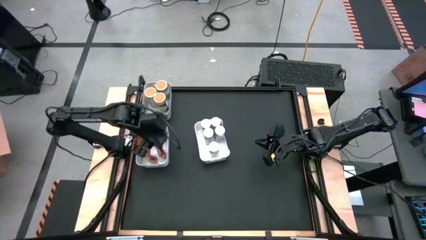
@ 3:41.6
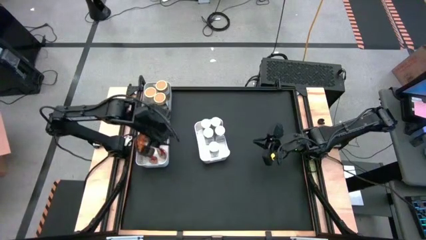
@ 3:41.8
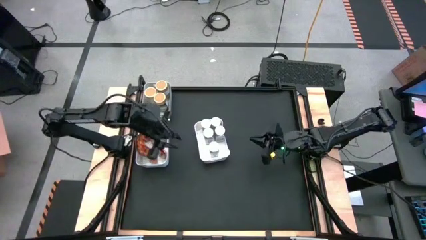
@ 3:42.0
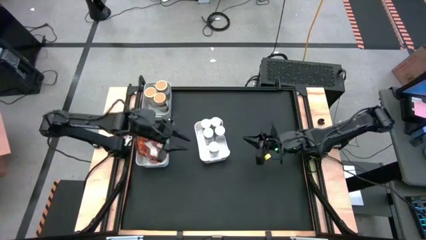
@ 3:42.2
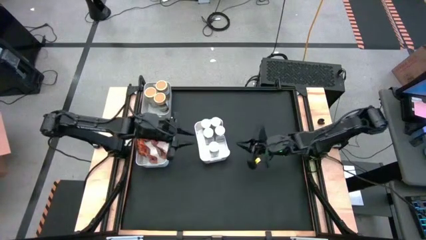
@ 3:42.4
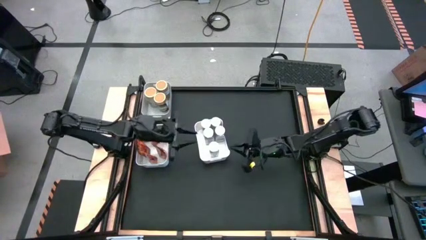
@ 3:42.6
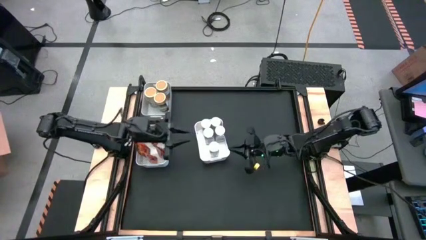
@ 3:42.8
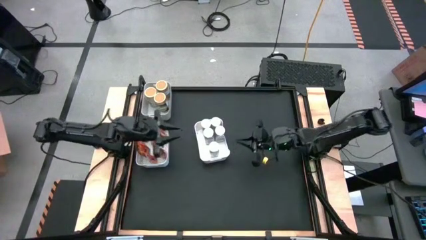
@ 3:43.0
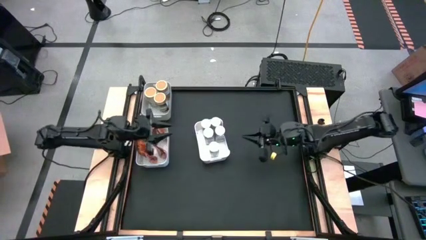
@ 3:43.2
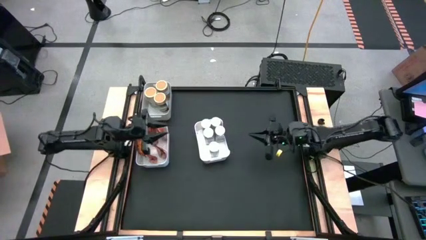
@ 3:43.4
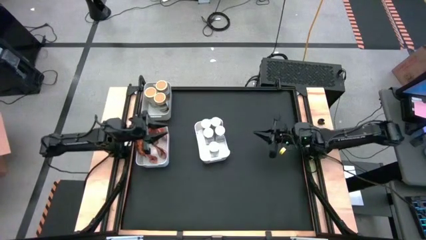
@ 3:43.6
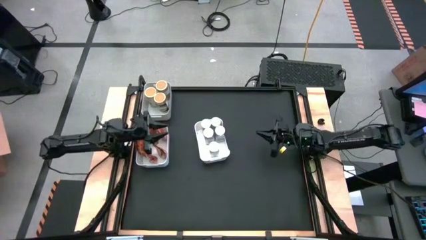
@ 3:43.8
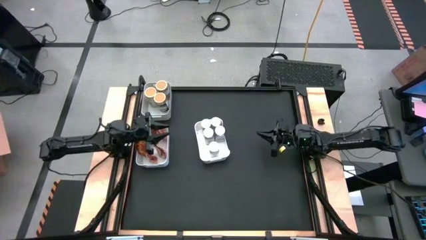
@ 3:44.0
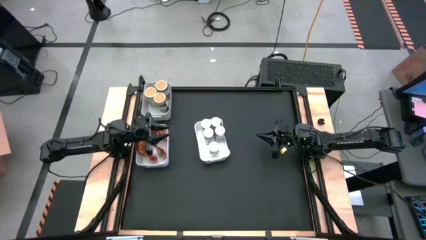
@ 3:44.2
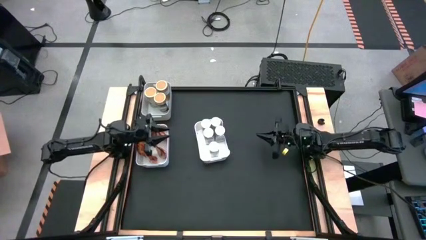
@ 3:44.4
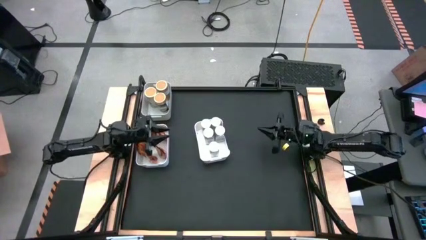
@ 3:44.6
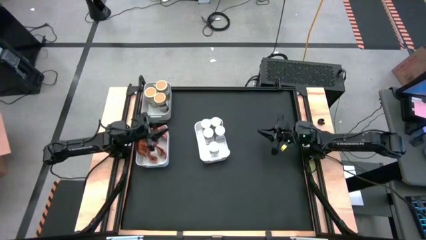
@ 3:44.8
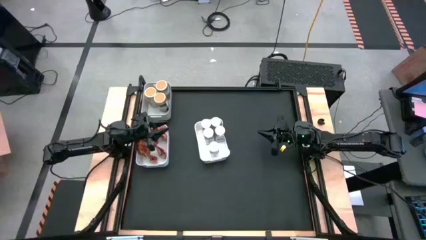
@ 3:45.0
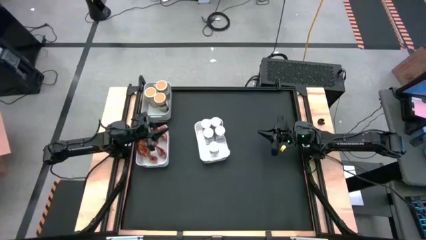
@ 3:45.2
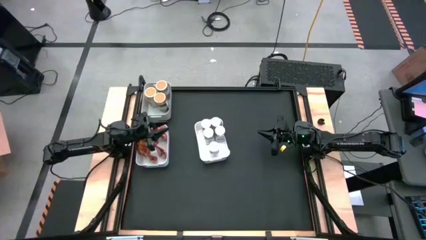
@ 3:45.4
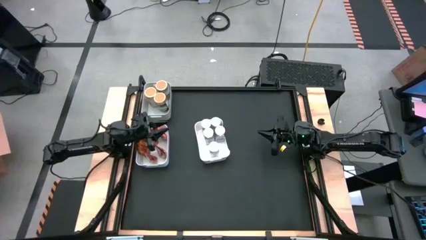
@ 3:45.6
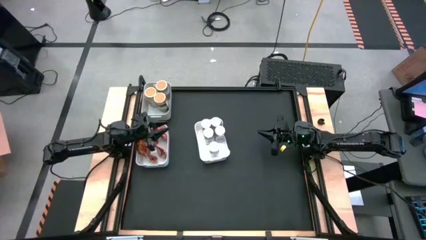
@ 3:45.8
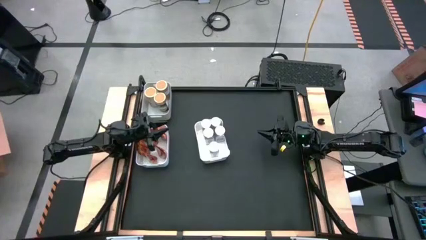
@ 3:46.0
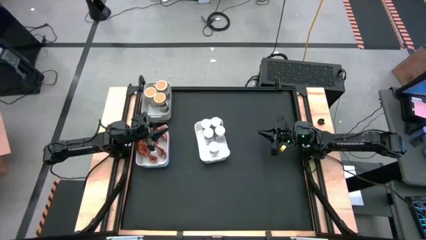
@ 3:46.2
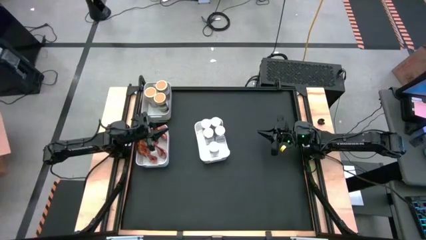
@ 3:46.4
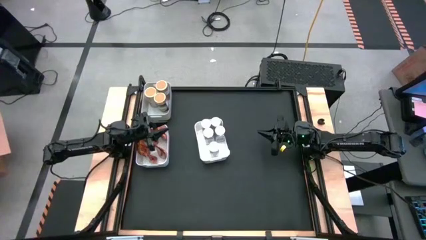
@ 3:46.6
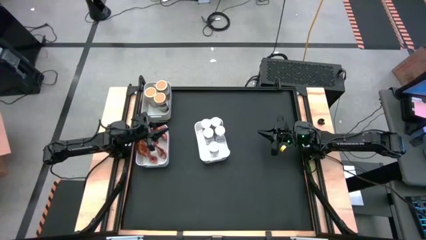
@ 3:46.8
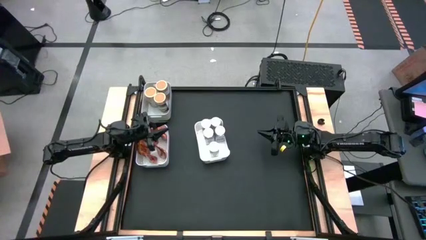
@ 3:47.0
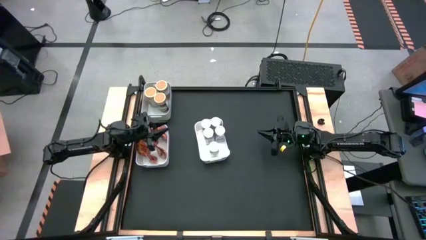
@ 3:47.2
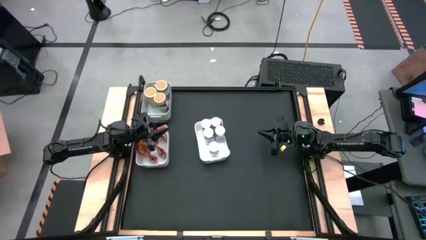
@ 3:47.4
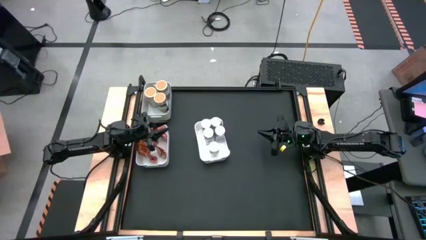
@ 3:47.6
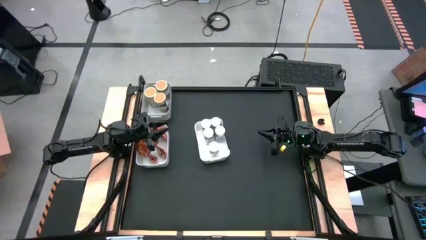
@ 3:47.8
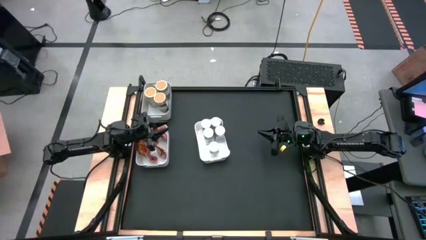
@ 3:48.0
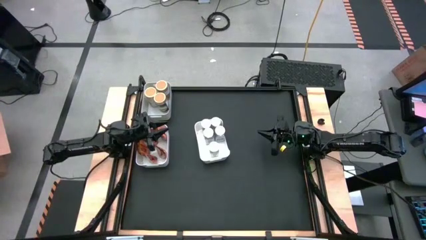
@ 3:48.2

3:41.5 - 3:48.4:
Task: Sort spices by type
Return to Home Position

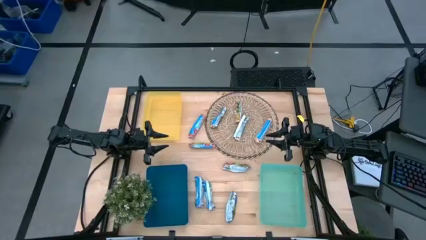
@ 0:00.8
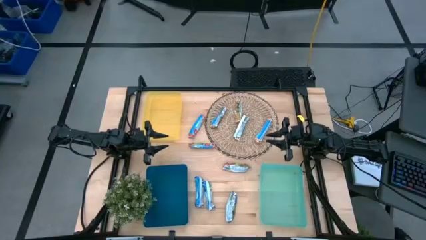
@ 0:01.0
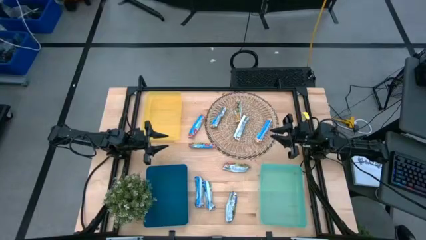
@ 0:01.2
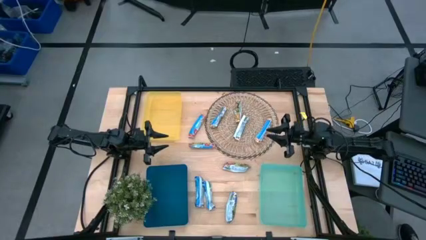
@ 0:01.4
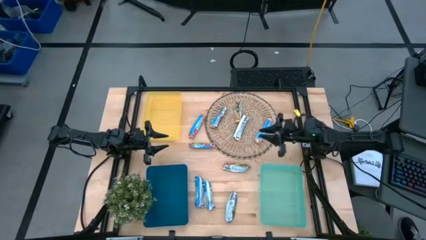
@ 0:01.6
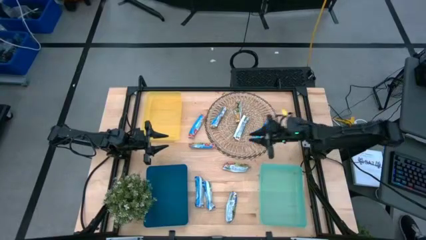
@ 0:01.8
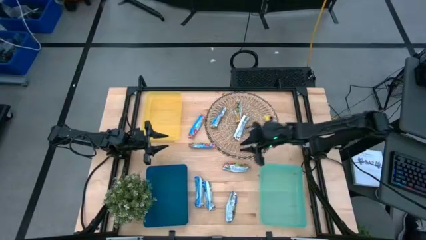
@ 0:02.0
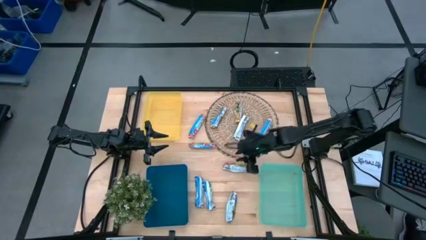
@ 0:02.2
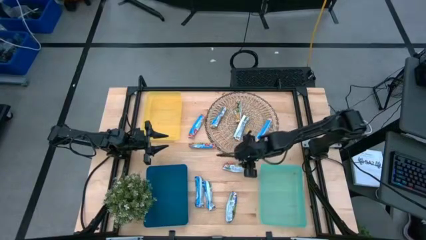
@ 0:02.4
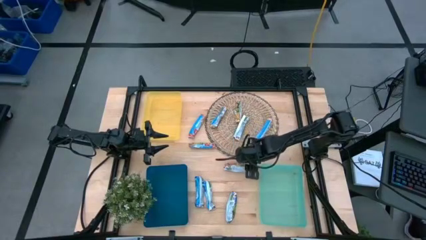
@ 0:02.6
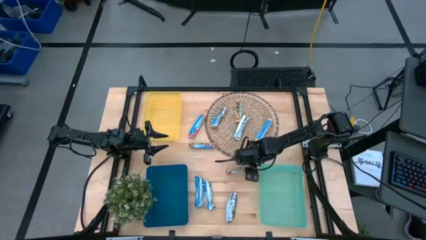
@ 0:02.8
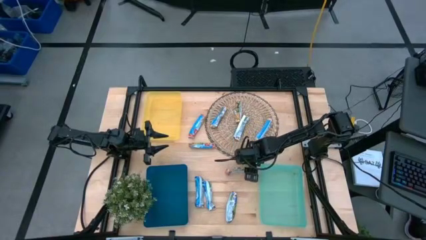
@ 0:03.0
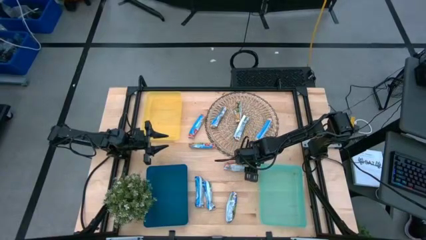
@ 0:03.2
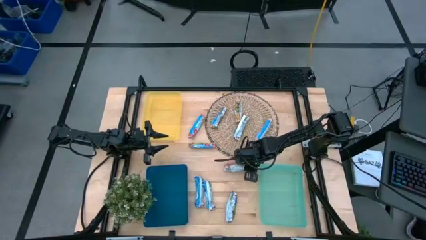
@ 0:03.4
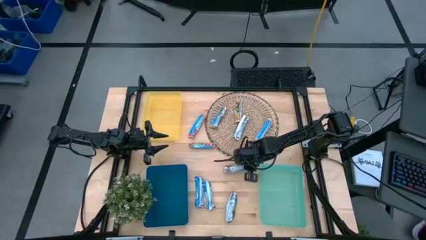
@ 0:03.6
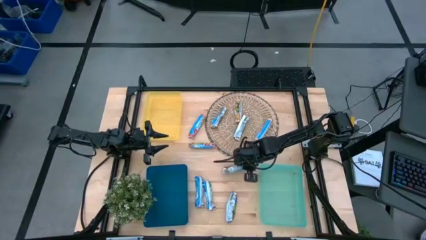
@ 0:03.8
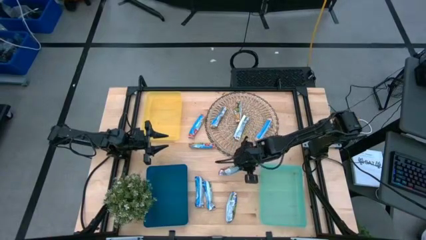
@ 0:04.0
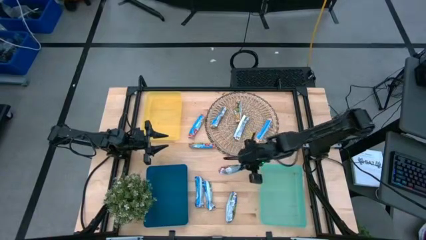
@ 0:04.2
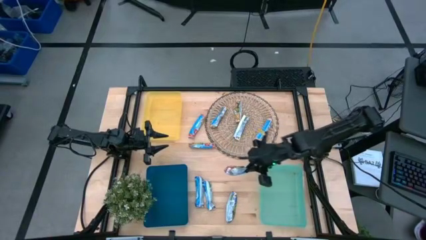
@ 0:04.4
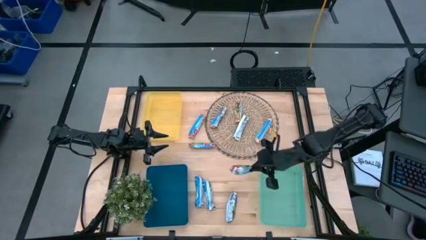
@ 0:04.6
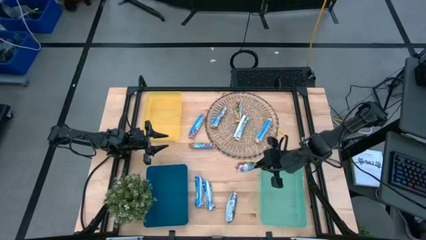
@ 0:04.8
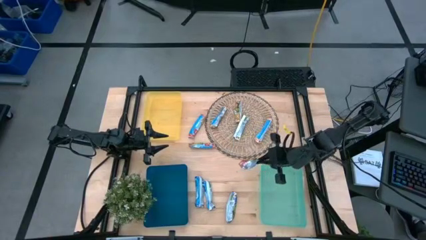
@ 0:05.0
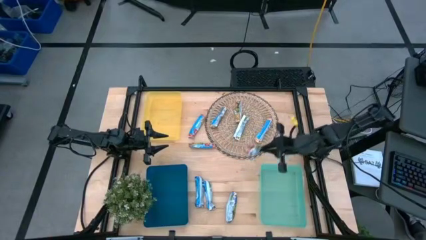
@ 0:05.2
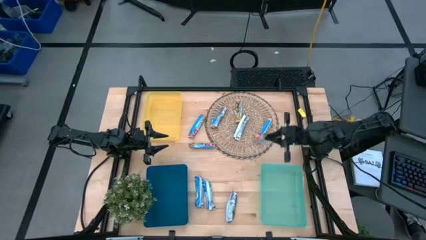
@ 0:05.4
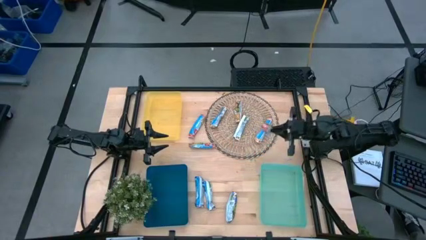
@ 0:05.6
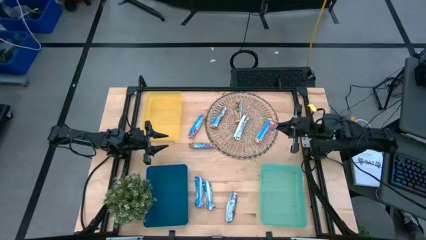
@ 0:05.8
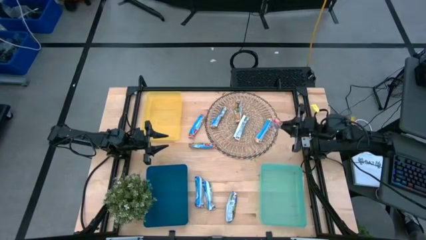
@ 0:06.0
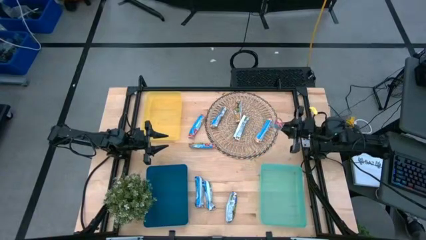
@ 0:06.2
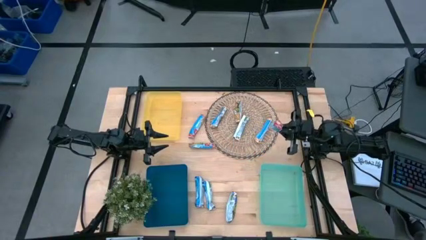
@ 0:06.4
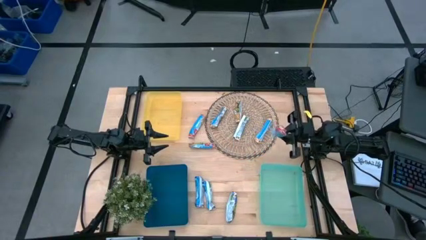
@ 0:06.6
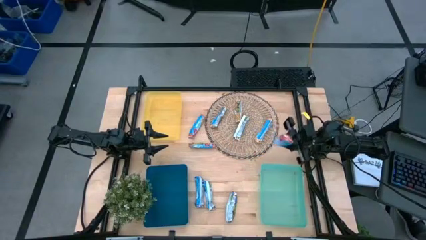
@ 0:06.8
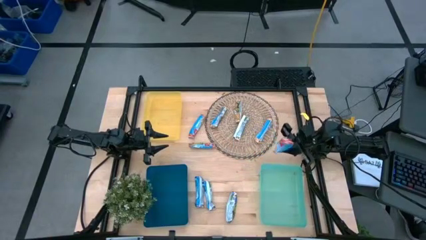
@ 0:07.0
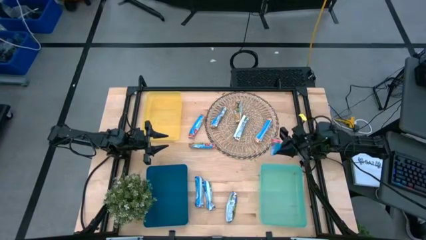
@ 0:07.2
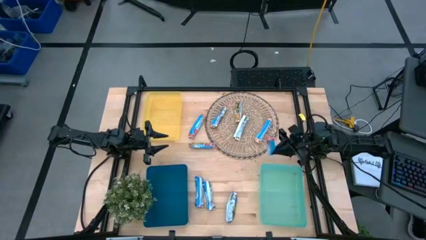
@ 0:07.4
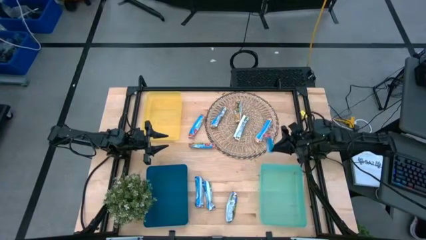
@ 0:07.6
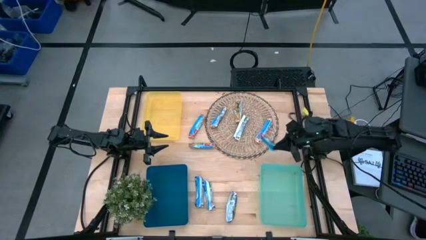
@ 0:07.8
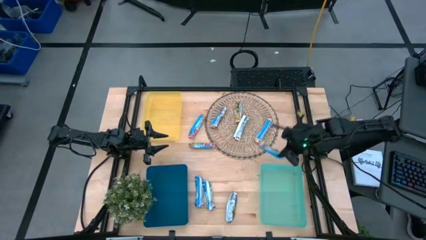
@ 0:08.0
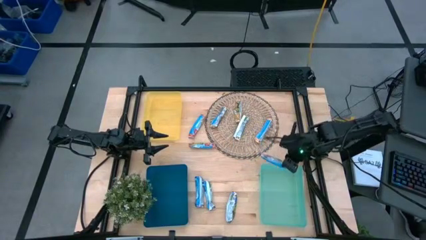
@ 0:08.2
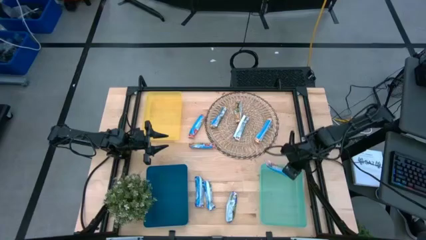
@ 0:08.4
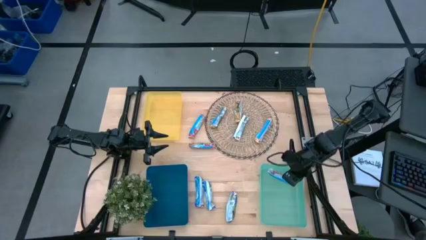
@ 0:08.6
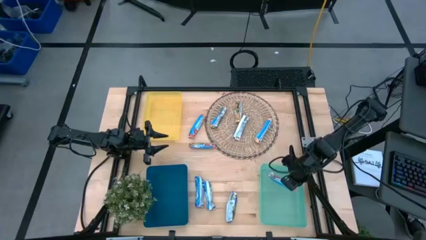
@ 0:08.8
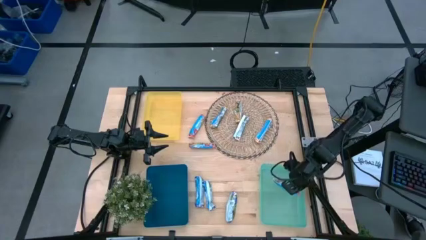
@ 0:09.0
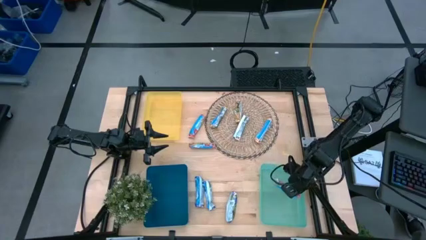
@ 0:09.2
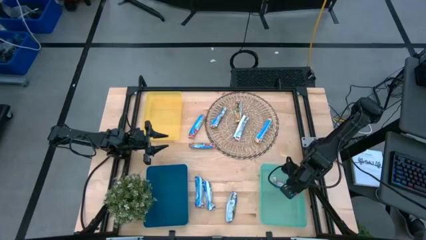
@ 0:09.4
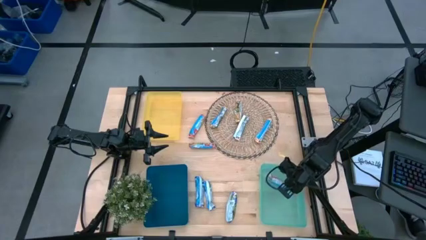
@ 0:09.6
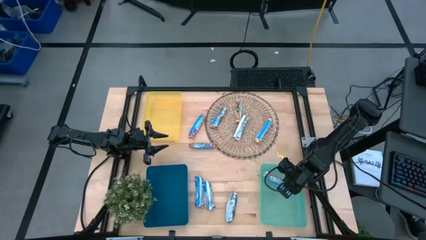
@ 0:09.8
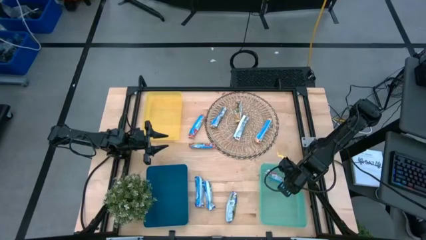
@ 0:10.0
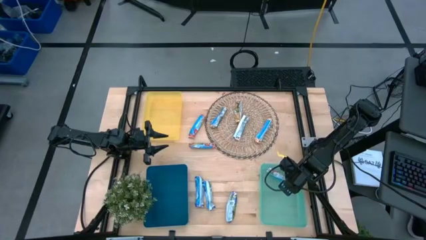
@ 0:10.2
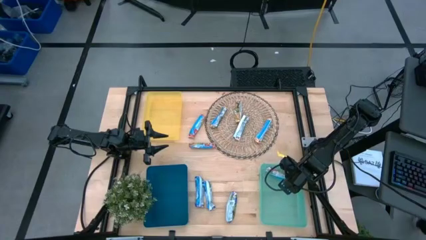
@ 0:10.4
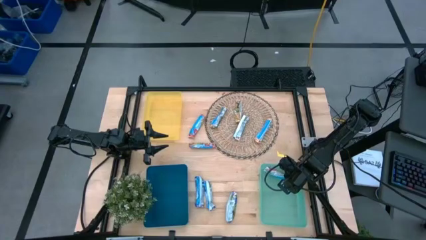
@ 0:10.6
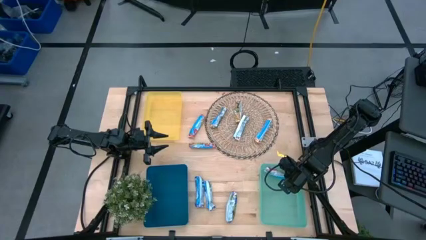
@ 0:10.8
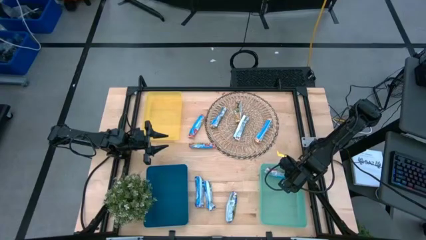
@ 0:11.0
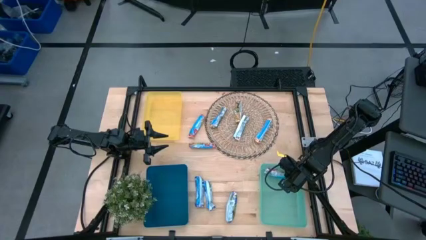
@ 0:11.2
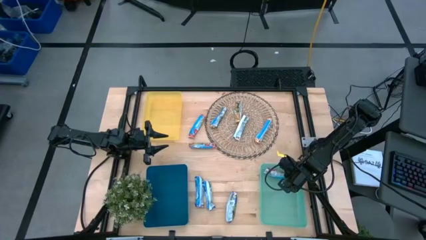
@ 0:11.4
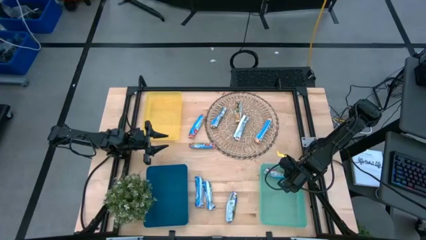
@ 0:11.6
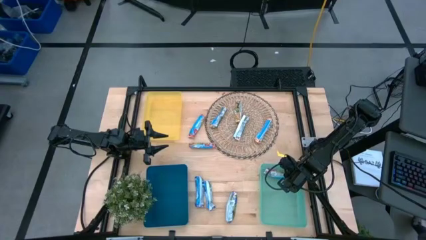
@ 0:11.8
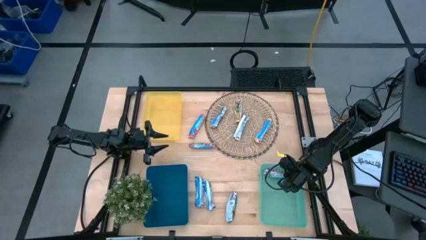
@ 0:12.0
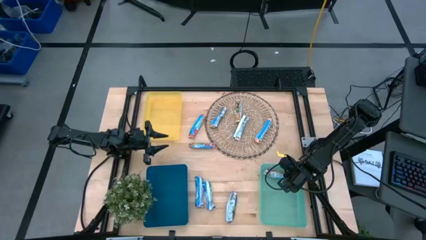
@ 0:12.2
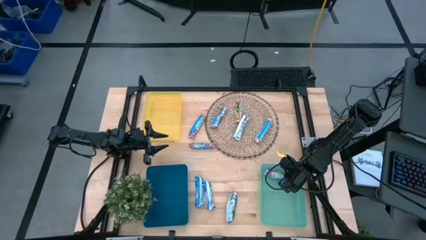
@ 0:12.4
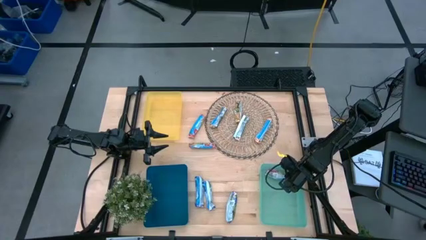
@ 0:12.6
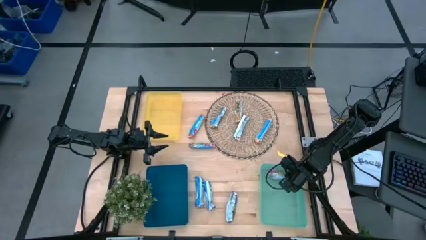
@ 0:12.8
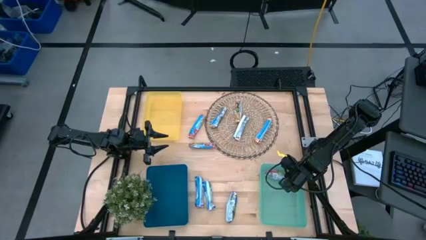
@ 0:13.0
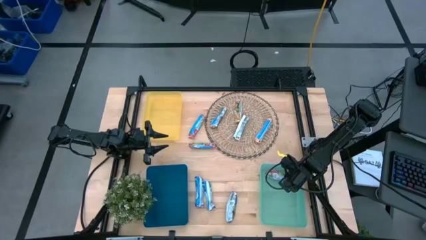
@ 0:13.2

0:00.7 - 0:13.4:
Task: Pick and place Granola Bars by type
Put the red granola bar into the light blue bin
